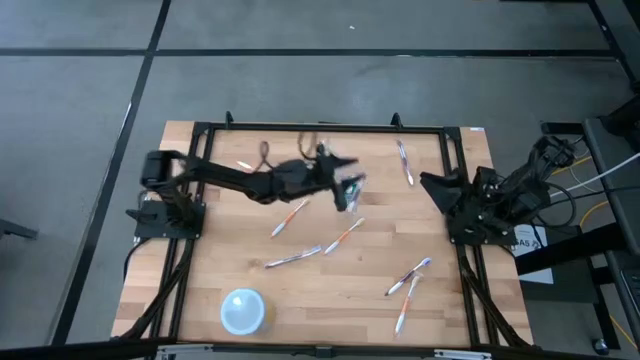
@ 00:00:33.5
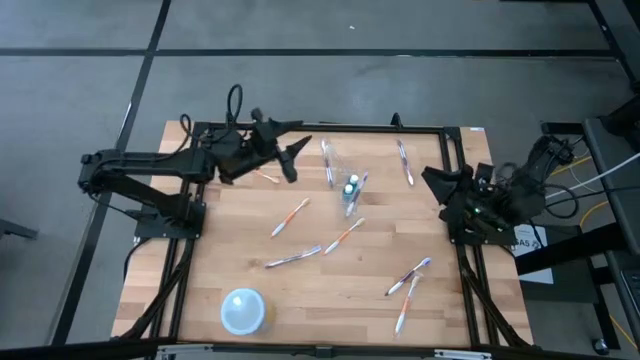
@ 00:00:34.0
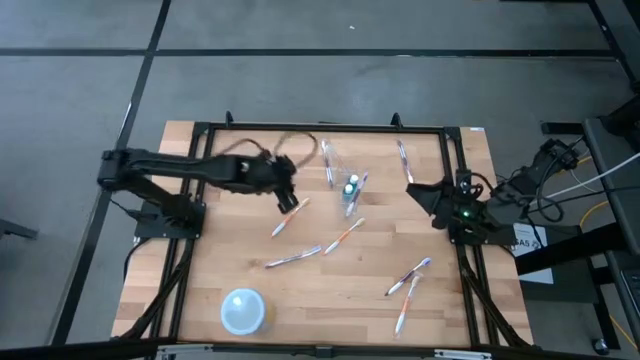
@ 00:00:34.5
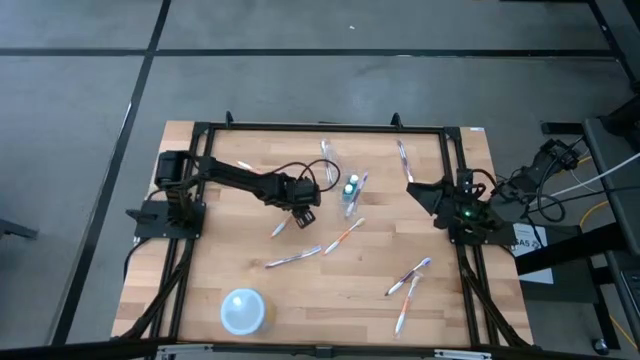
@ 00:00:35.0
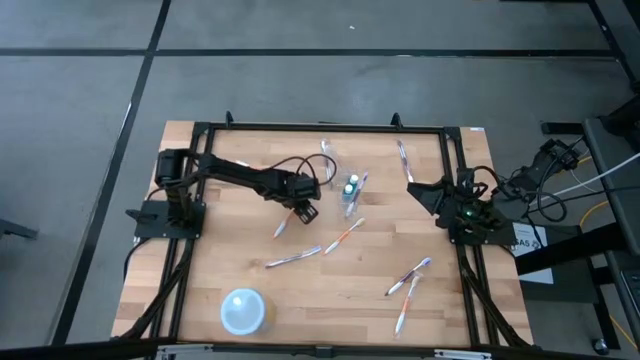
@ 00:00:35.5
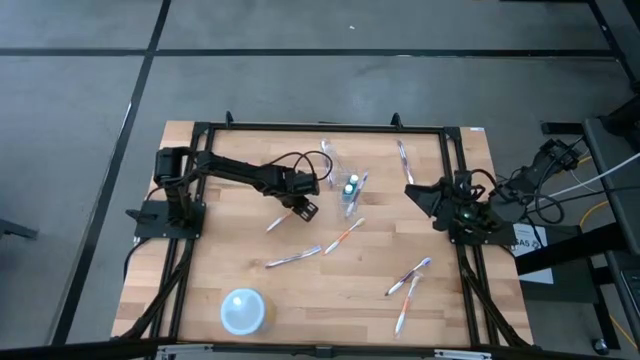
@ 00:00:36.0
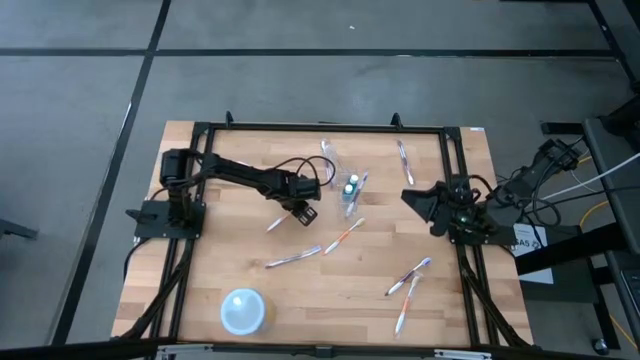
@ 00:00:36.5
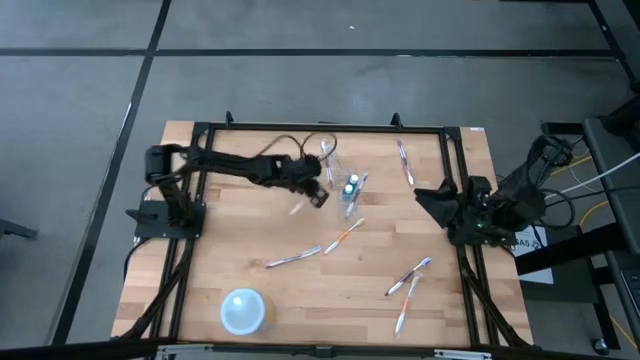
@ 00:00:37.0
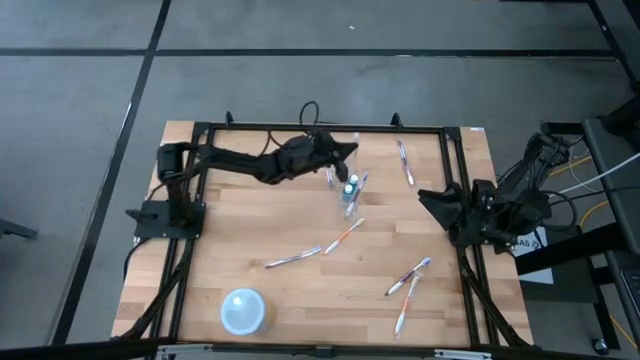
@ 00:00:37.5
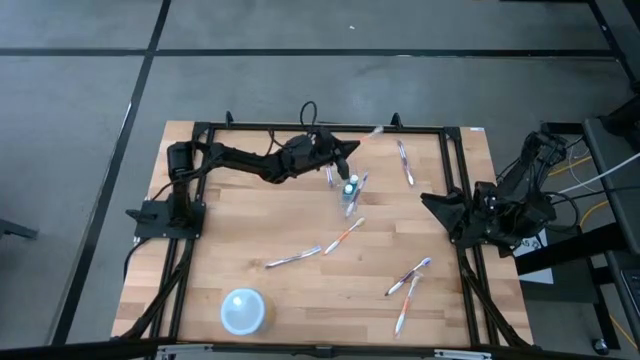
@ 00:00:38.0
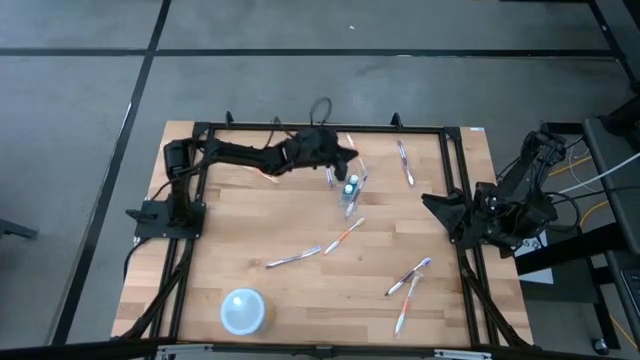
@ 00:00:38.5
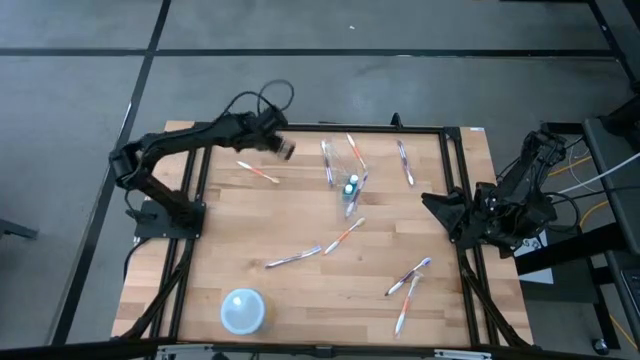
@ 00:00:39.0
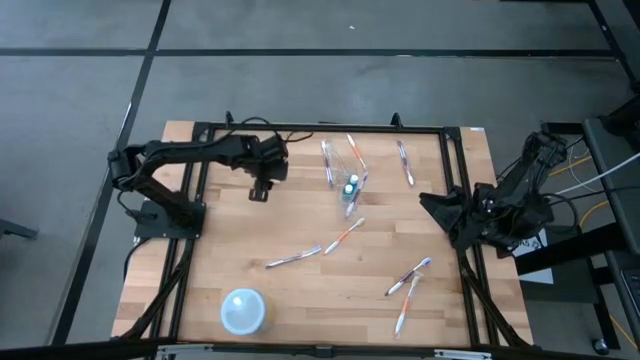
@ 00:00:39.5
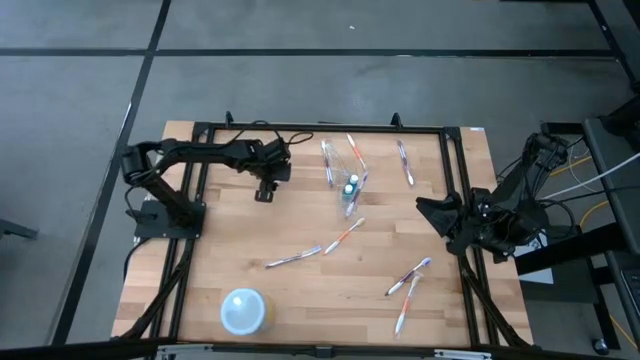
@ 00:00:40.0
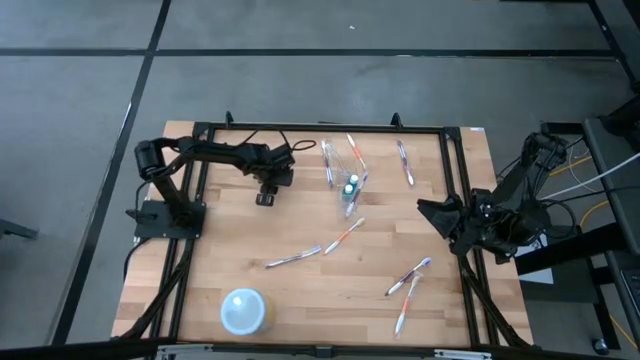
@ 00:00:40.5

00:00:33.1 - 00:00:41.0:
Task: Pick & Place toothbrushing station
Put the orange toothbrush into the transparent organizer

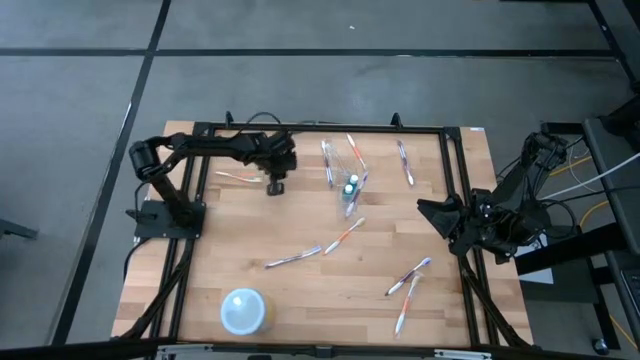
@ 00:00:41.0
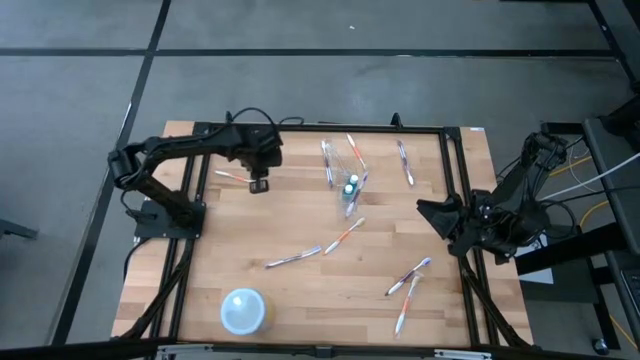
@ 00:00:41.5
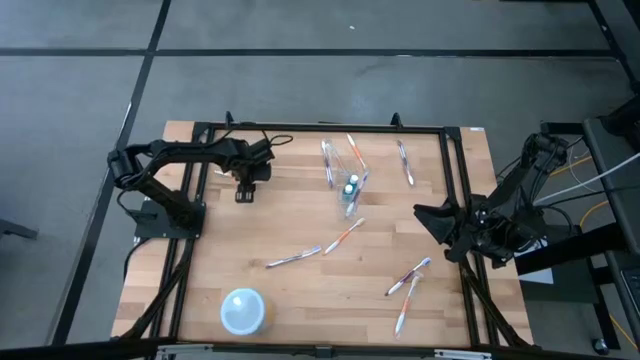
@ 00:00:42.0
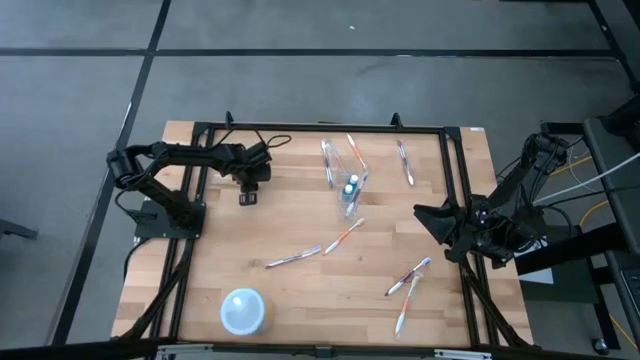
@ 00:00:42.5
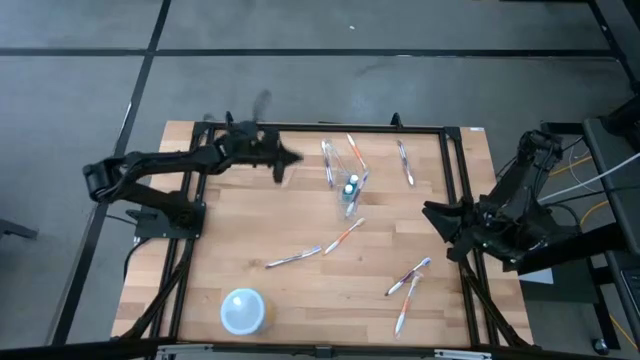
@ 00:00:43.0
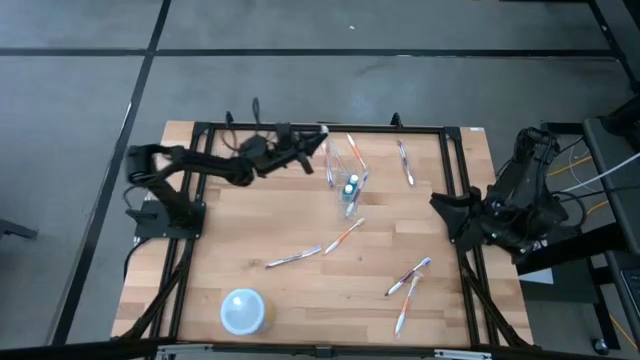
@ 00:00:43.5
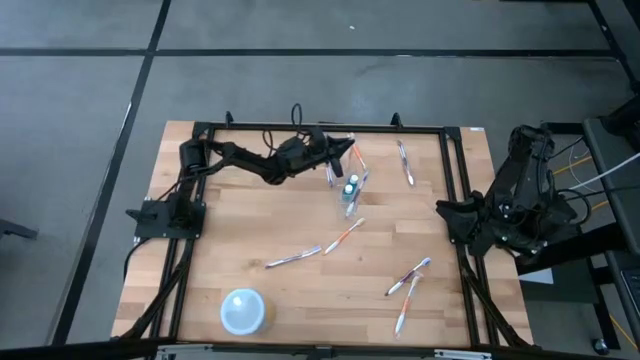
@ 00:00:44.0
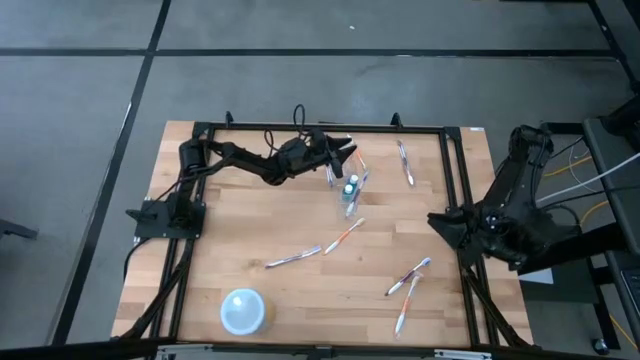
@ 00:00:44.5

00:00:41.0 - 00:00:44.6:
Put the orange toothbrush into the transparent organizer

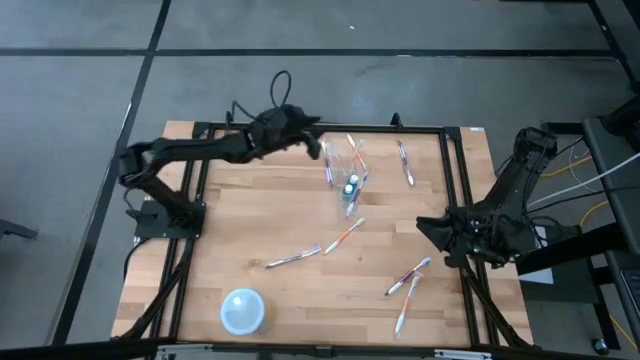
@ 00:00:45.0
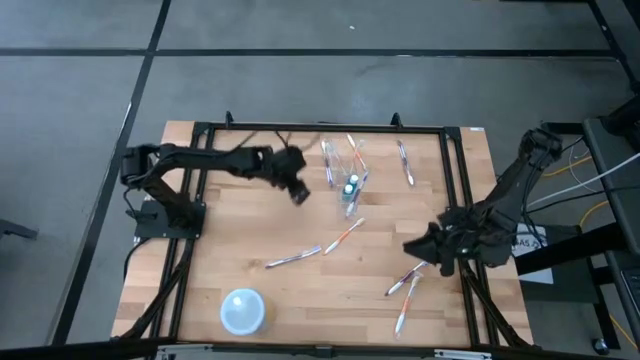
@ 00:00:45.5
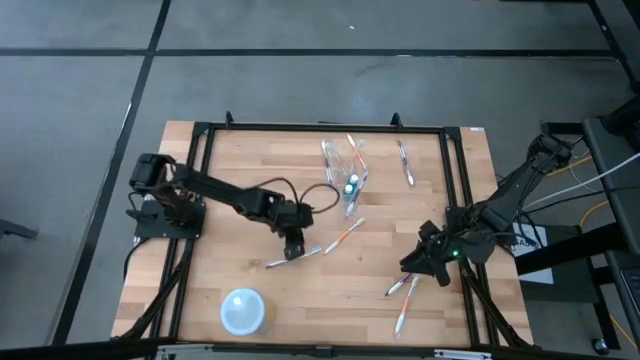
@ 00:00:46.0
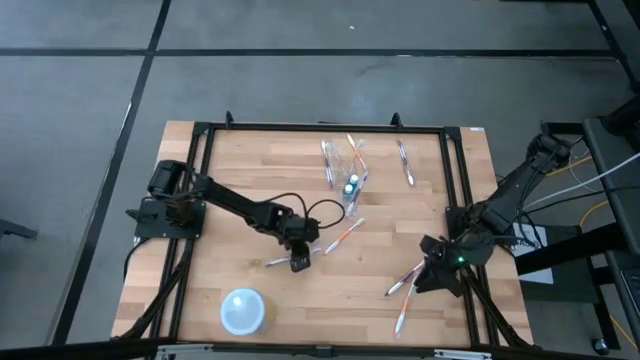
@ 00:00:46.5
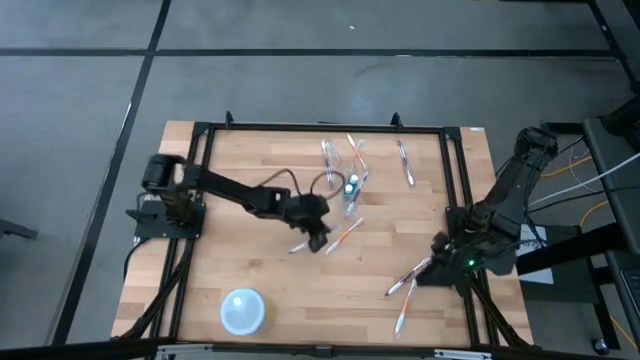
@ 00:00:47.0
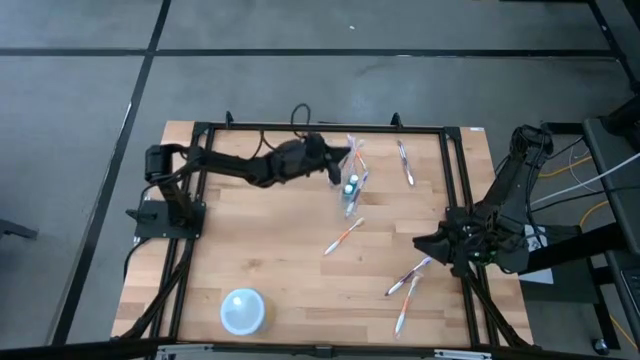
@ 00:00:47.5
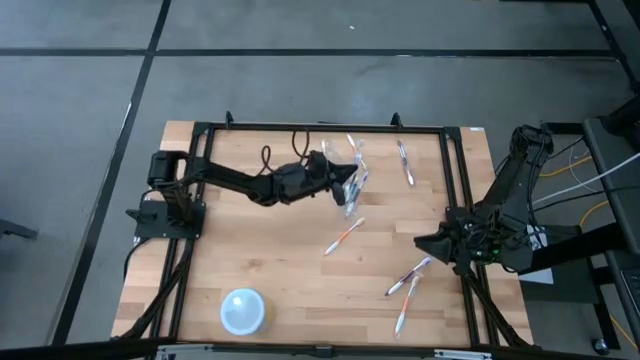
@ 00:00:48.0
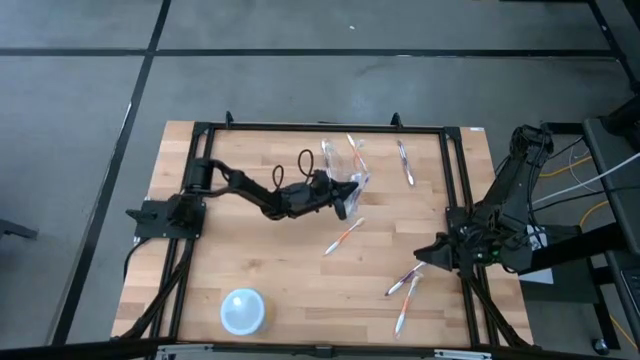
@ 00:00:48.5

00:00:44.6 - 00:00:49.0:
Put the purple toothbrush into the transparent organizer

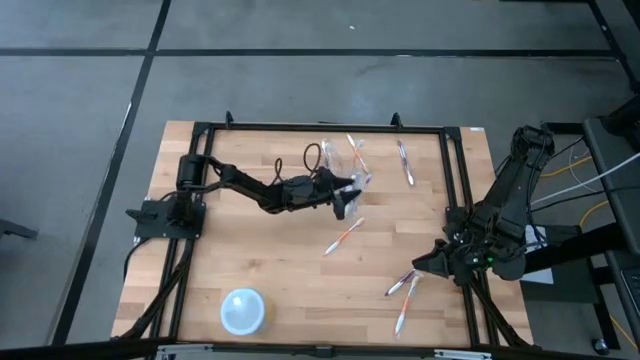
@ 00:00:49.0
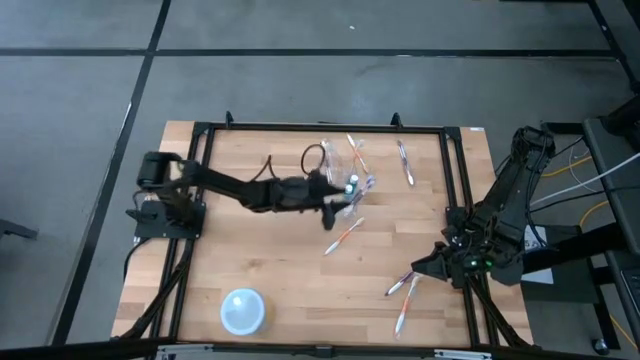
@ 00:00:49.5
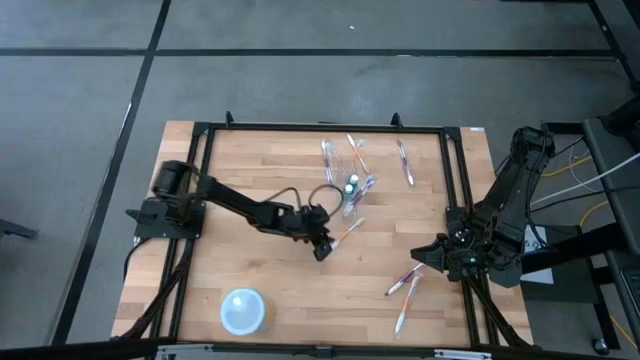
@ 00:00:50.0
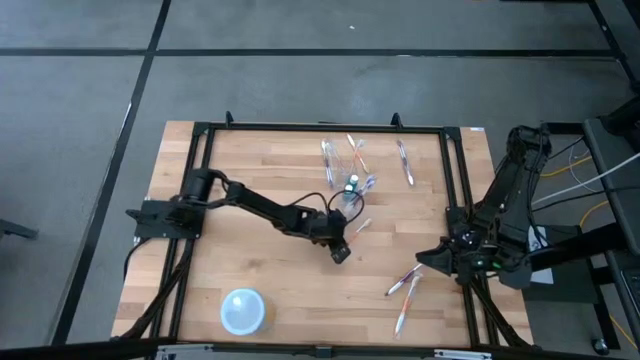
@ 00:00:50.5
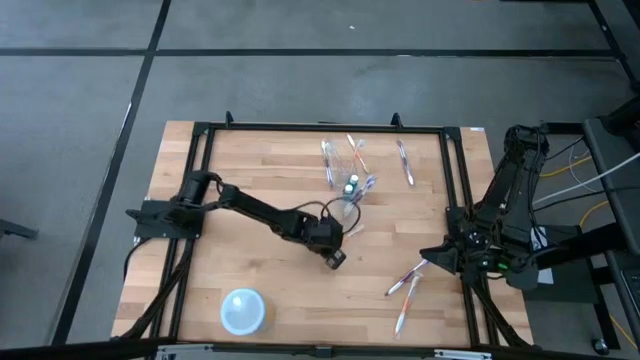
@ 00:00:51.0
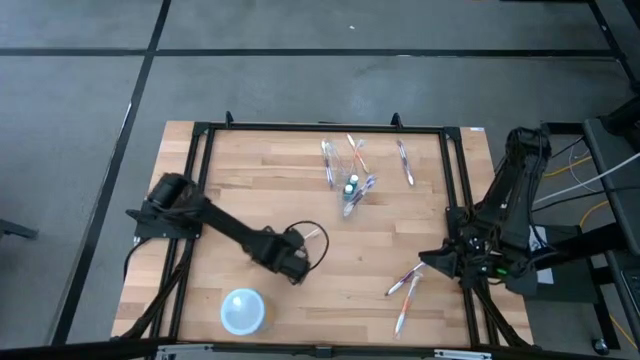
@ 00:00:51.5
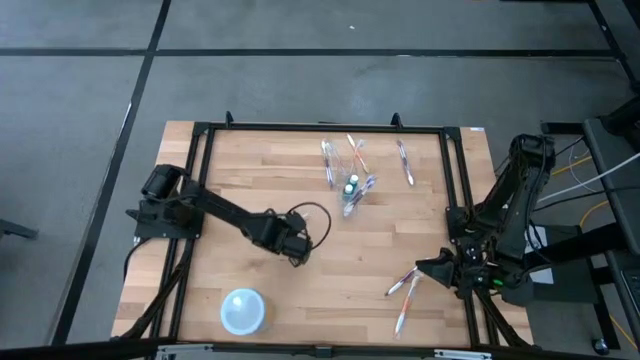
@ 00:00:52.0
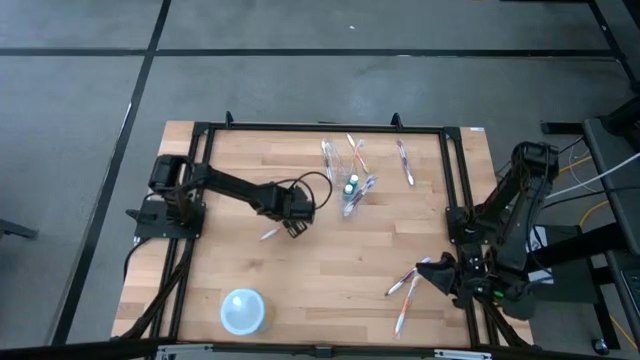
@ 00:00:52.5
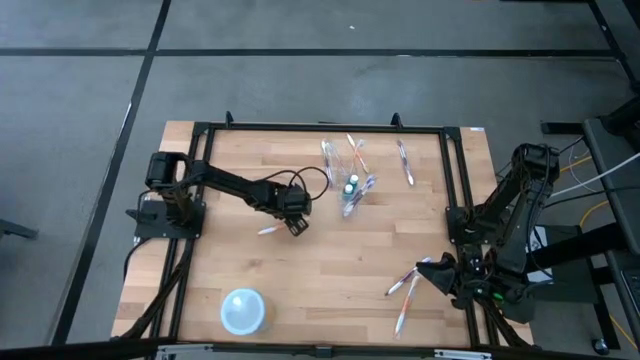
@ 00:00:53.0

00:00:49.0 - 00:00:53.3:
Put the orange toothbrush into the transparent organizer

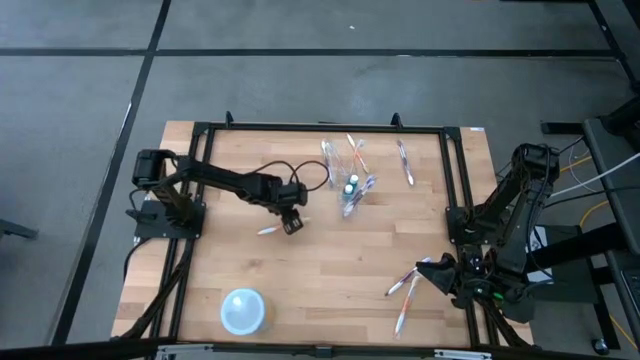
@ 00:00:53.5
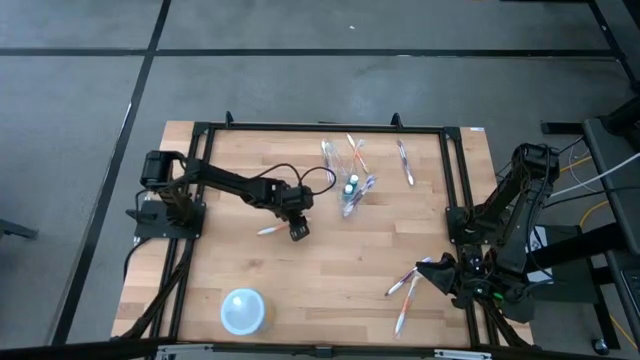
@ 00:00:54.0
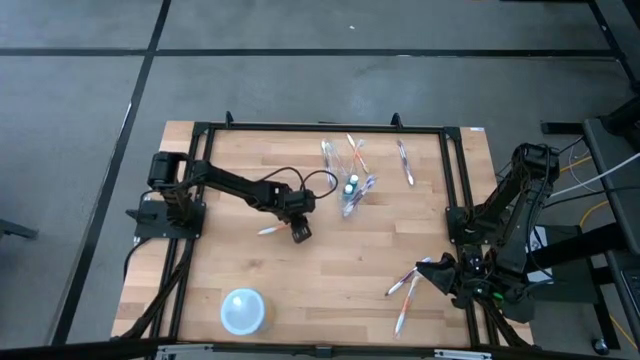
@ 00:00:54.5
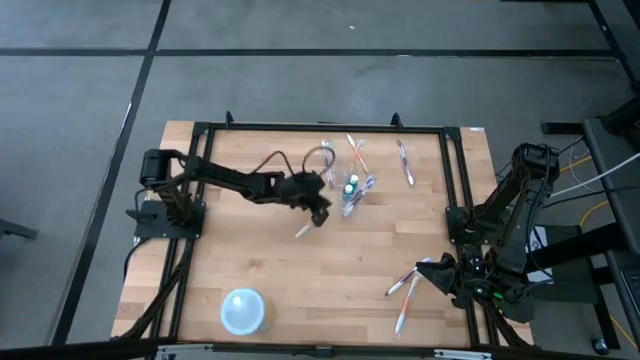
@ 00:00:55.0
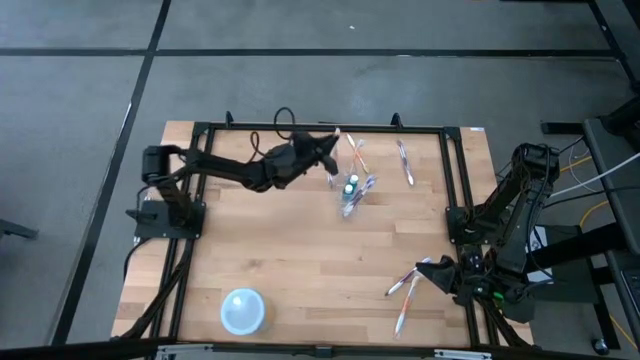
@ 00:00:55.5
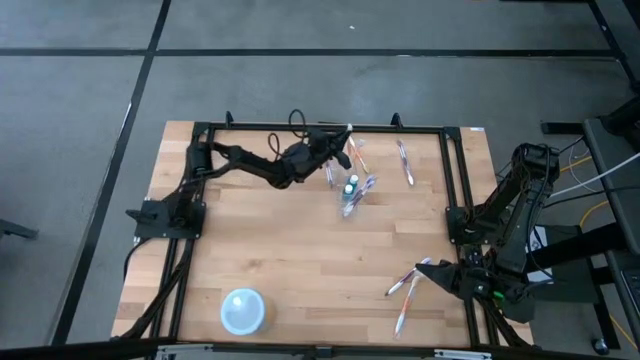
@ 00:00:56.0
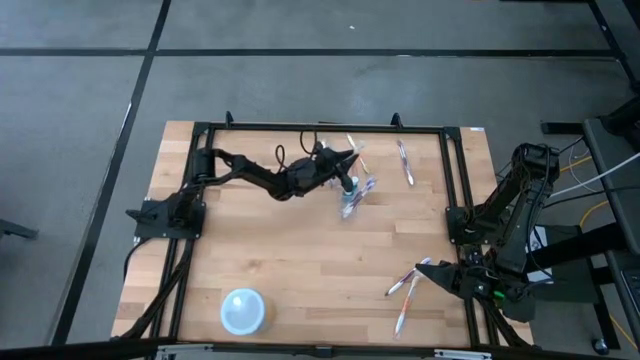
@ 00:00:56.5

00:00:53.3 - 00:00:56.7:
Put the orange toothbrush into the transparent organizer
